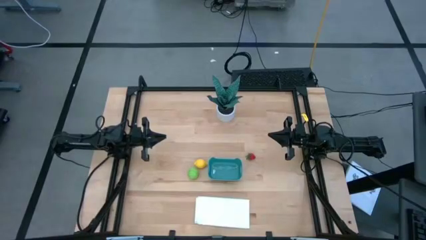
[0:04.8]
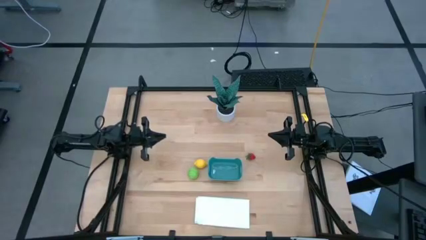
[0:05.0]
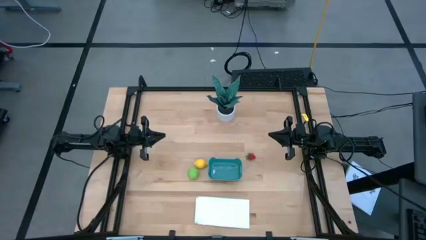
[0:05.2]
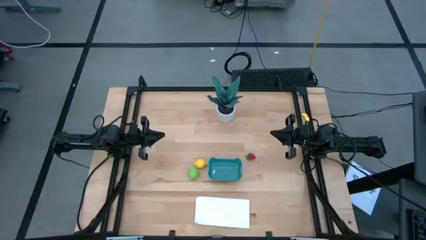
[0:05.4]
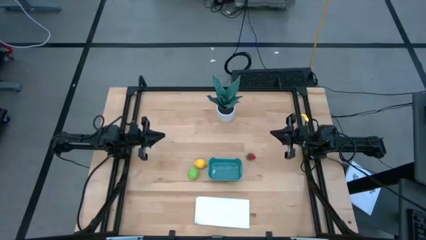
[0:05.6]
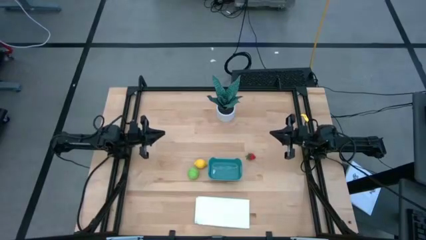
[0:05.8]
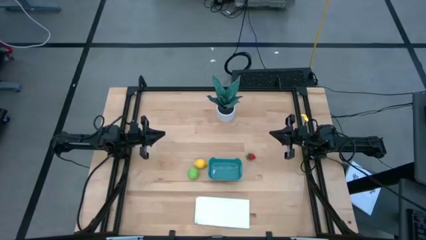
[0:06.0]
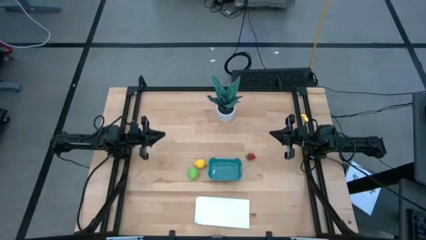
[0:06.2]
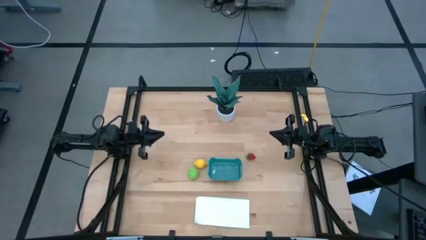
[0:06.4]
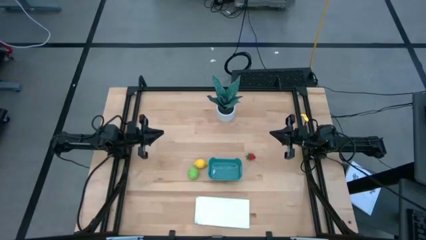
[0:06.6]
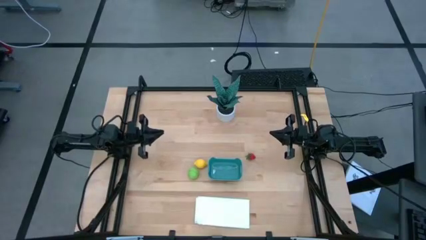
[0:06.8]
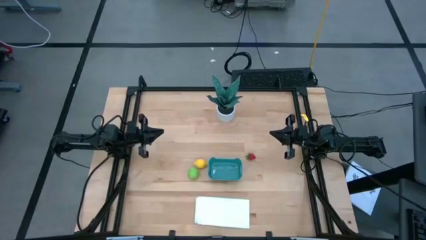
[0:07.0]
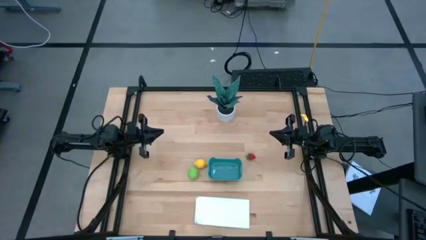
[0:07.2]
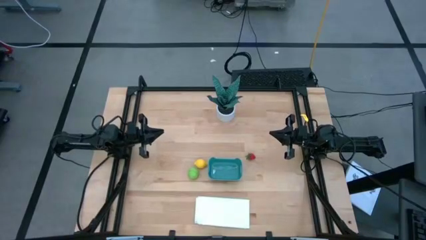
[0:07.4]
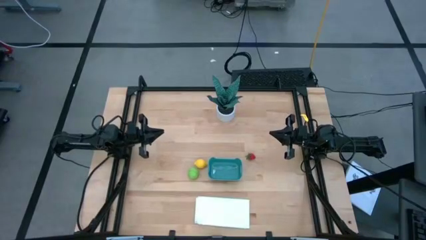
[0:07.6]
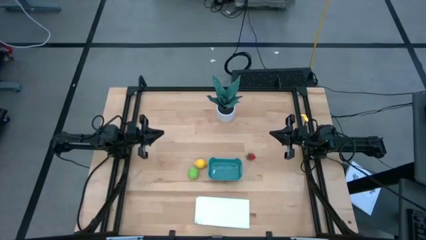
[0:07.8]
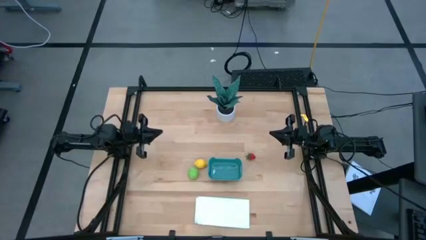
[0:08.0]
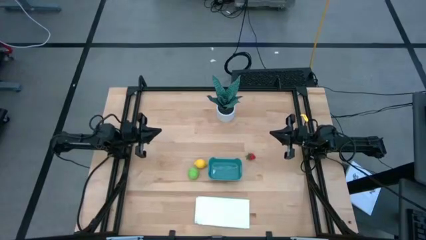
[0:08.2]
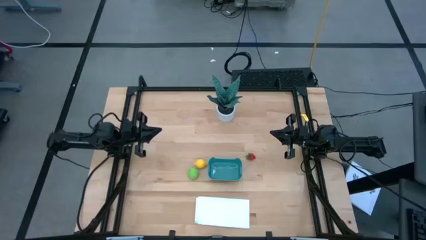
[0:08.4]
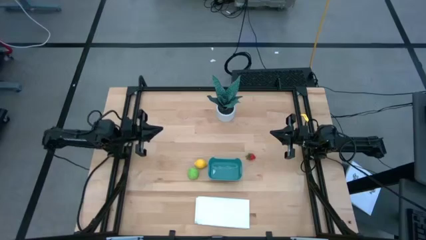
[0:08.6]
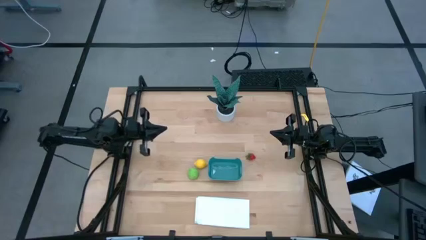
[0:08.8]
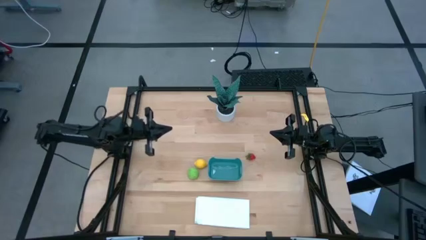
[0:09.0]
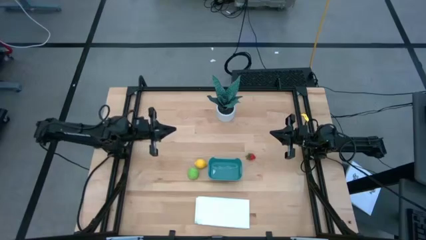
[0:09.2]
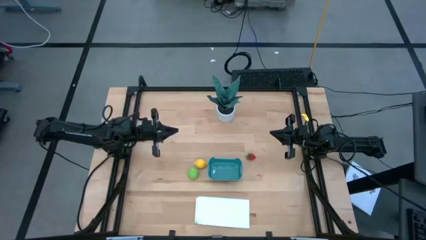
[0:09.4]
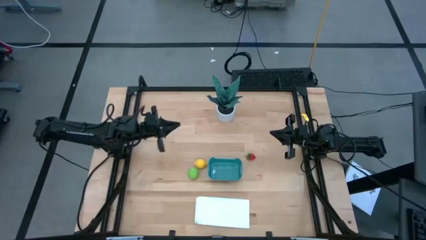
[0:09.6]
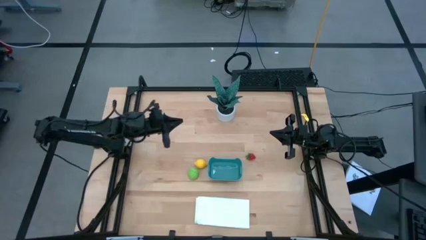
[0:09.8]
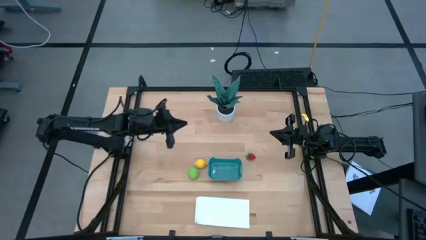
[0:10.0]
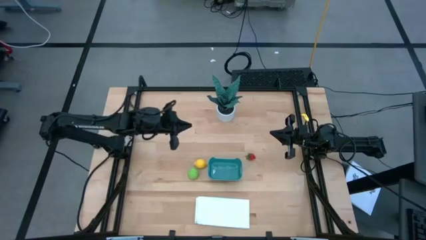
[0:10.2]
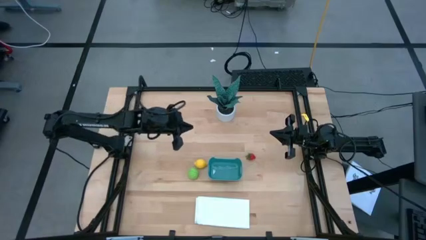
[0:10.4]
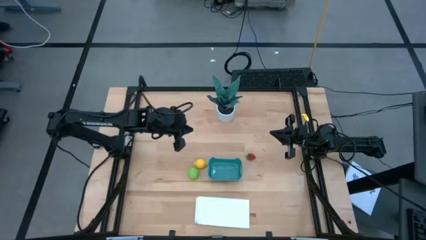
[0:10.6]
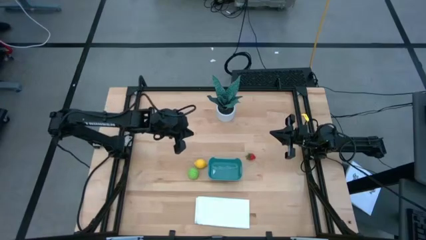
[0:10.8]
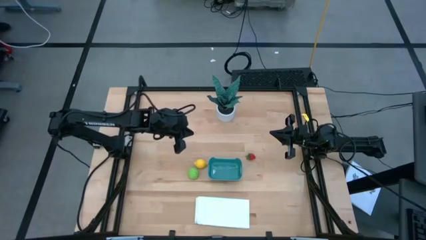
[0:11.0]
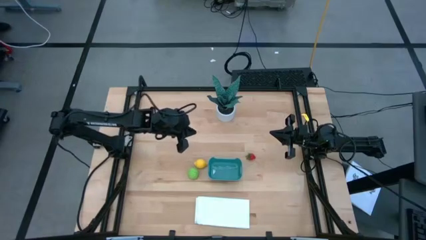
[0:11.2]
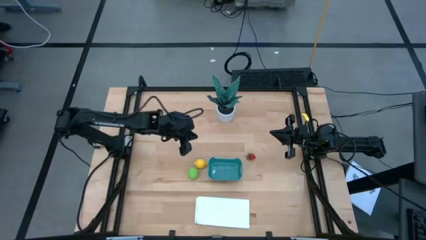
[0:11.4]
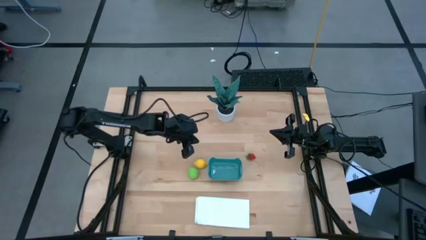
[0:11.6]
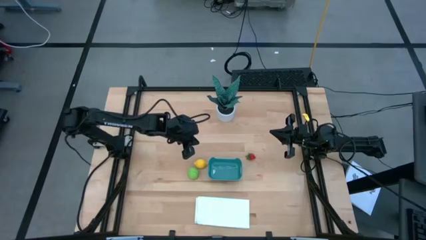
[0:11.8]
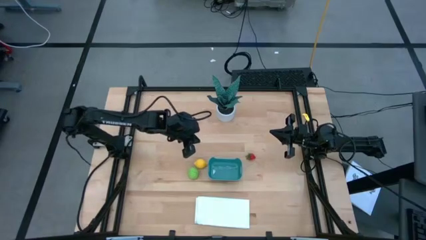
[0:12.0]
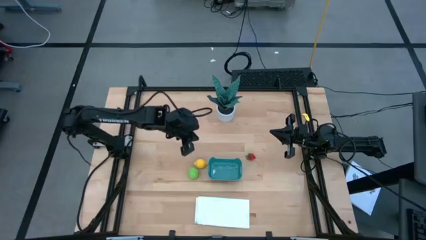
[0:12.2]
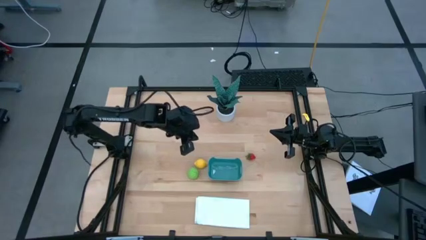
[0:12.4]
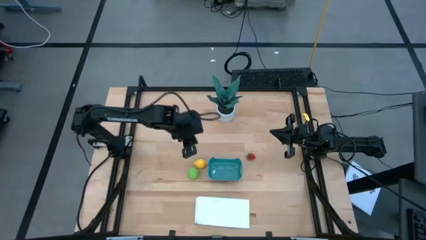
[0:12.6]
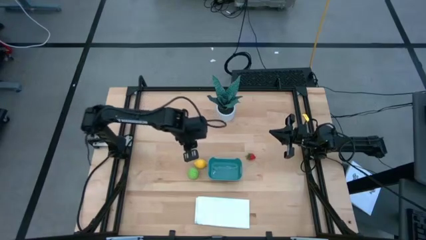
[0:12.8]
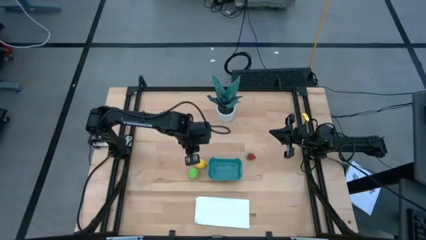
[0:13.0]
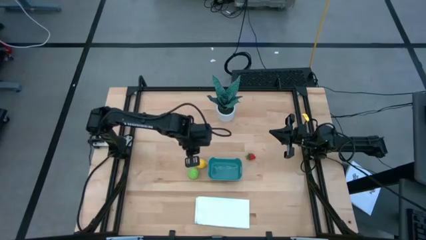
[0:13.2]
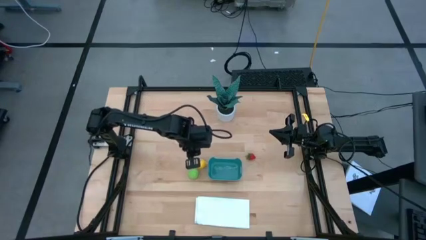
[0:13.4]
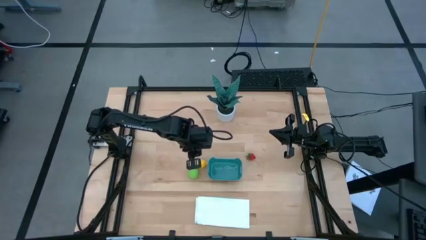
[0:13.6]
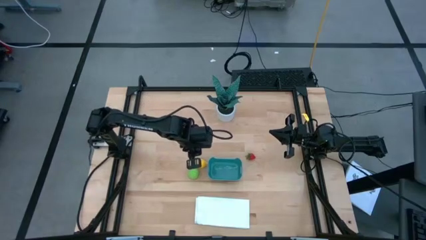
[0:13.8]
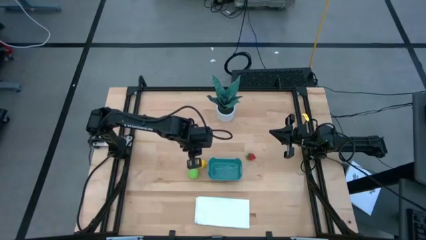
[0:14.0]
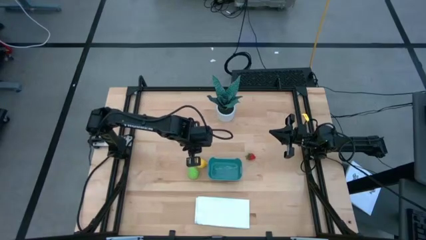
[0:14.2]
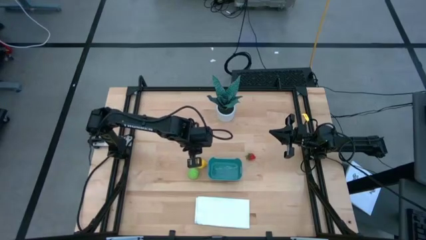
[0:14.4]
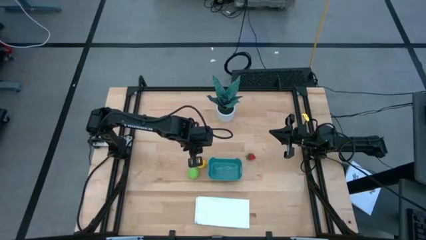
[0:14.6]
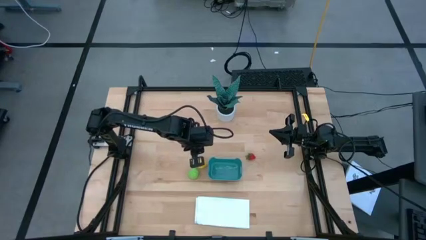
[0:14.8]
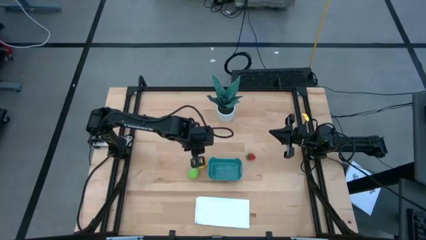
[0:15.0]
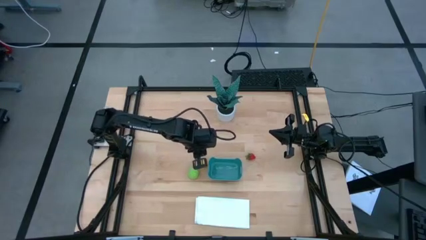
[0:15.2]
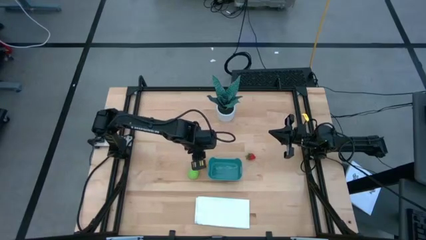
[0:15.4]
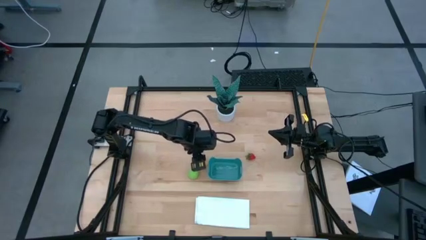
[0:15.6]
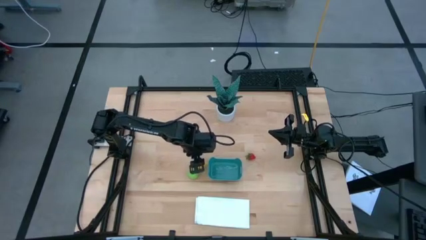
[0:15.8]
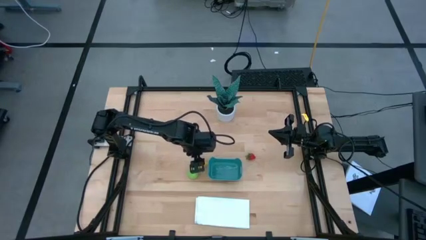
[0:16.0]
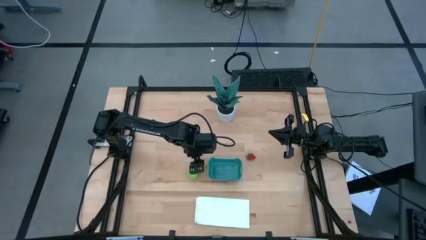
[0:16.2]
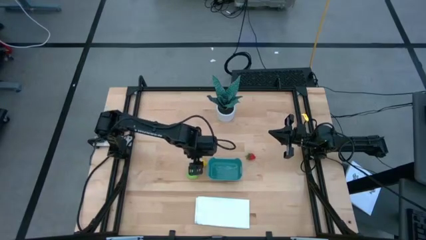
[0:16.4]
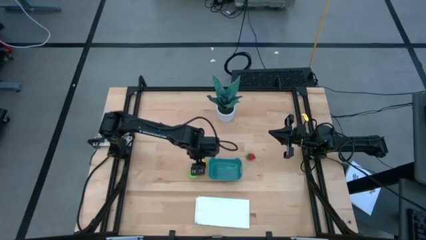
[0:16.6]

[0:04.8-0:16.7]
Task: Pick and placing Produce into tupperware
Put the yellow lemon into the green bin

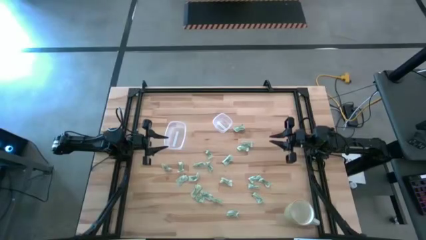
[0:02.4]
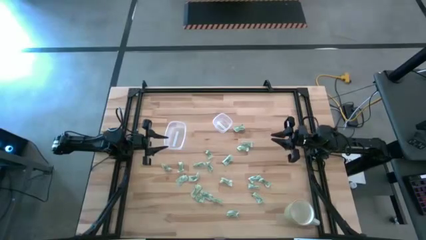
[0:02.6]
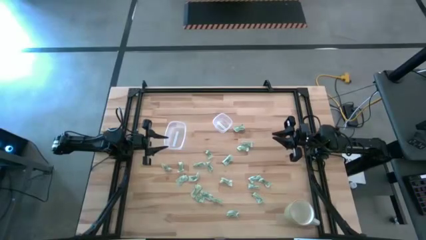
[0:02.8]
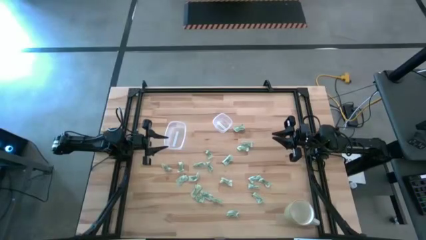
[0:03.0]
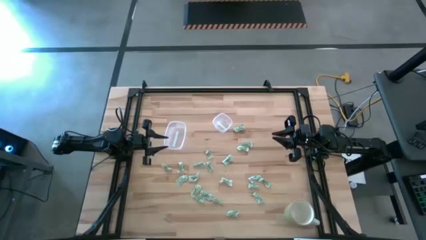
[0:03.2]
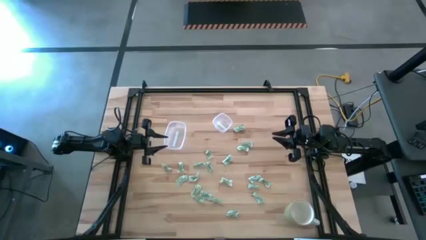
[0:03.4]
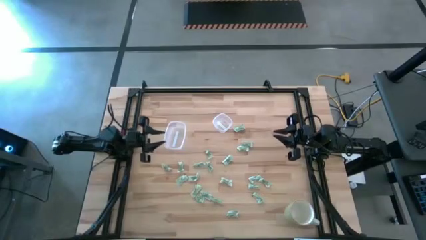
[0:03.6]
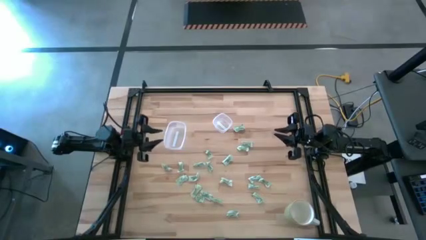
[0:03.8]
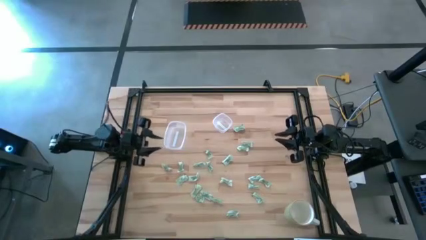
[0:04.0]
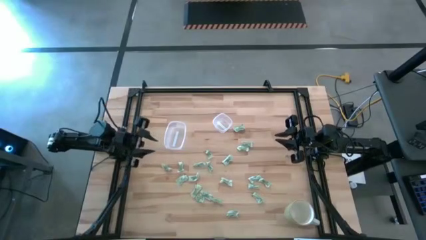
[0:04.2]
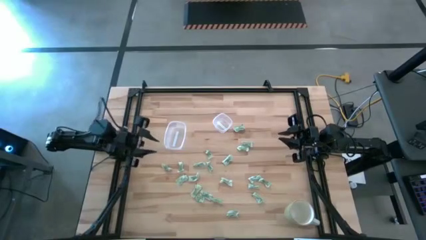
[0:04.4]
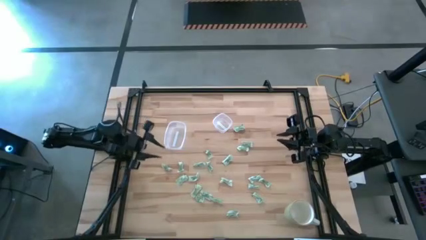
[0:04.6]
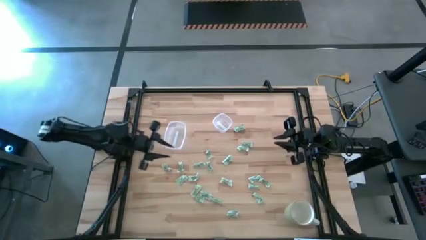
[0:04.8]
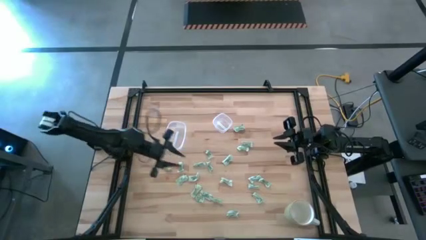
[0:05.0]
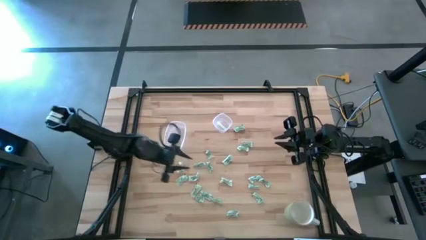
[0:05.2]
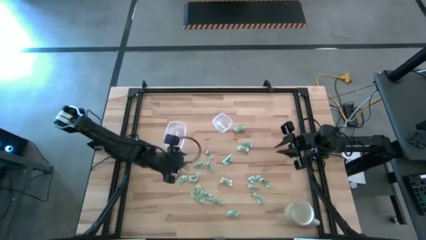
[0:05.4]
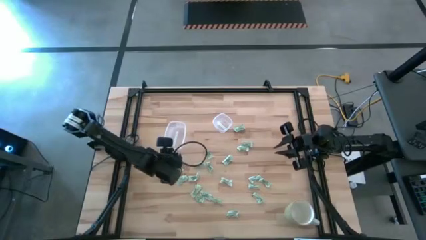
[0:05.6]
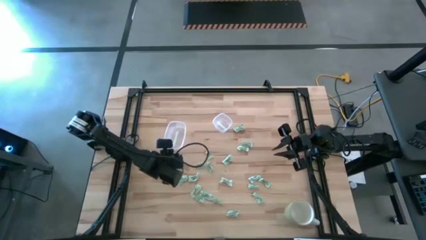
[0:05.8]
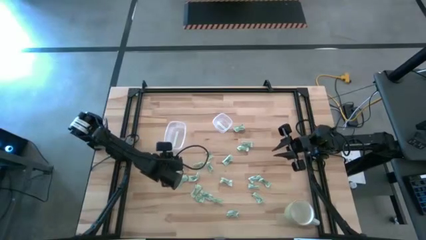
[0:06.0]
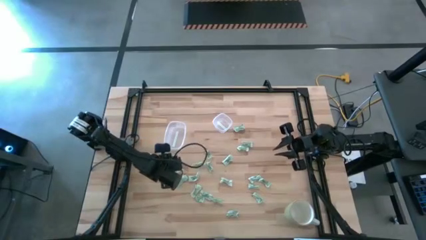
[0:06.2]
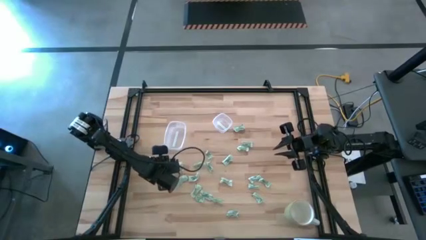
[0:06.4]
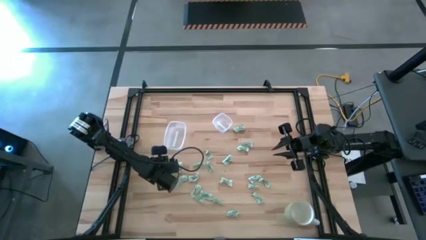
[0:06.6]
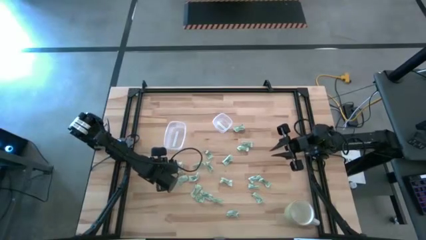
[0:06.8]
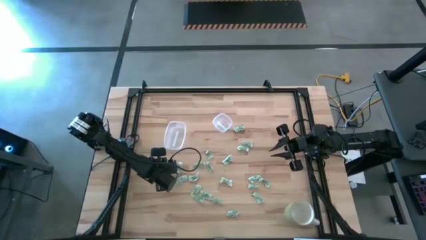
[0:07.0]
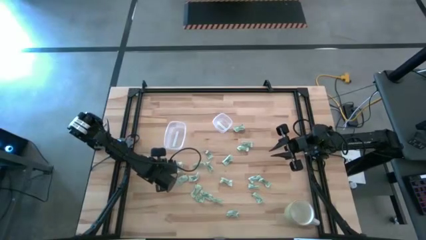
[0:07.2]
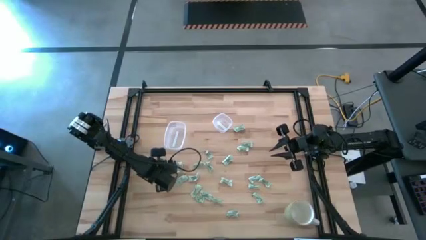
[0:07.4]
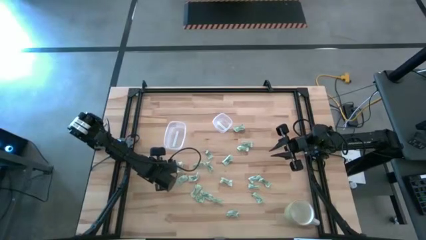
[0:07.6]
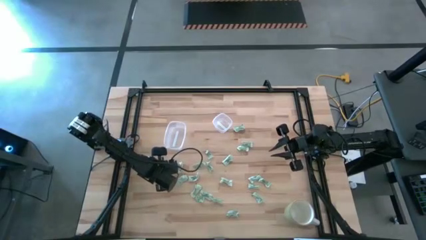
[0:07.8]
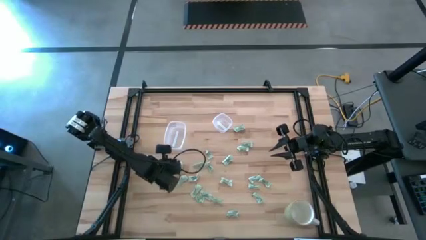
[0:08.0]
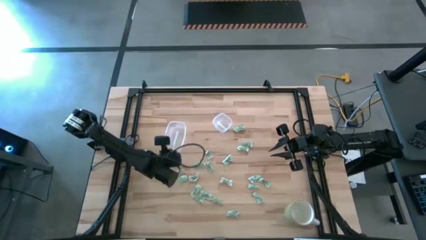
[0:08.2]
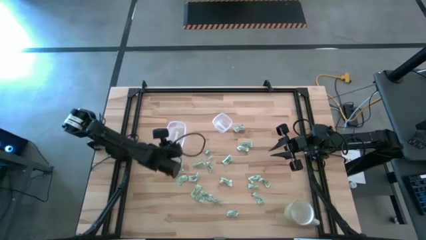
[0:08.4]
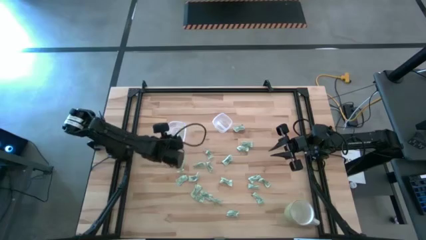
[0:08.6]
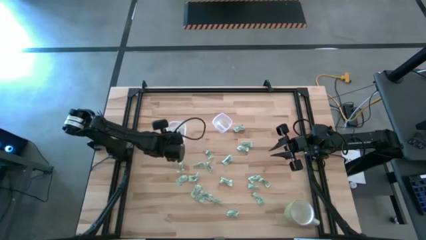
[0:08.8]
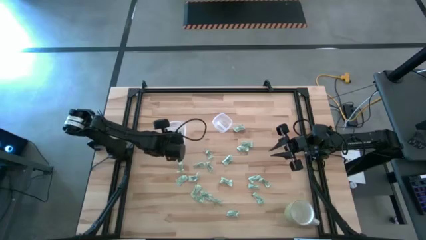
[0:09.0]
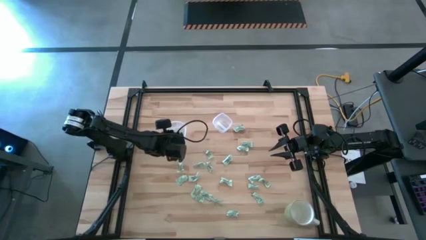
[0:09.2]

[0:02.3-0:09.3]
Task: Pick and place items into bin
Put the stevia packet into the rectangular transparent bin
